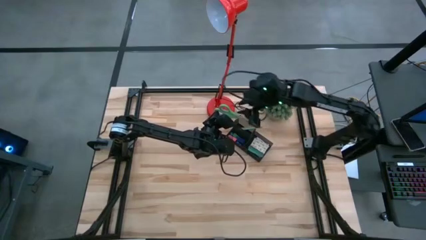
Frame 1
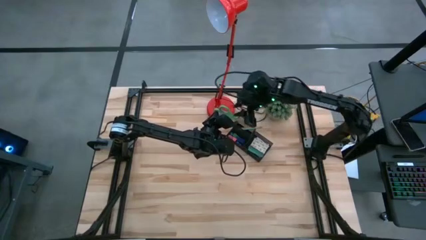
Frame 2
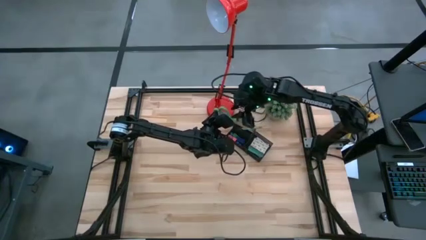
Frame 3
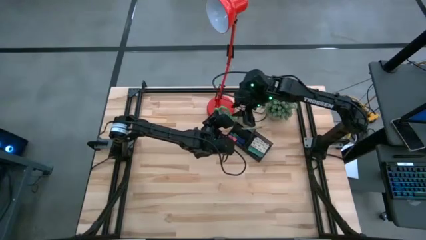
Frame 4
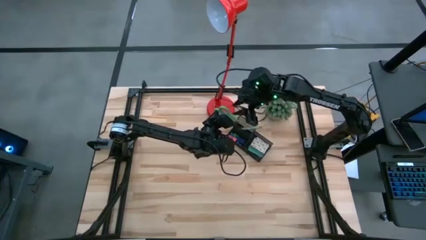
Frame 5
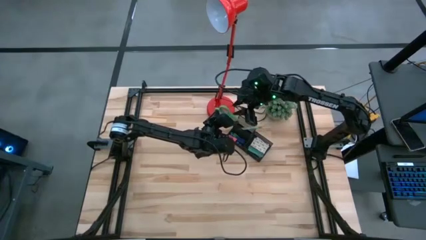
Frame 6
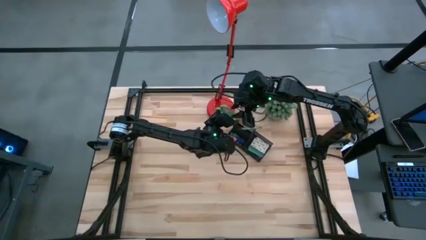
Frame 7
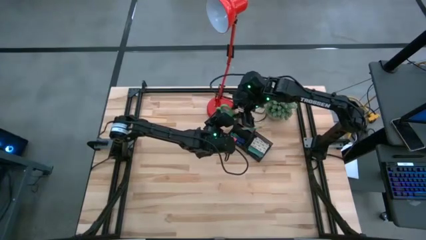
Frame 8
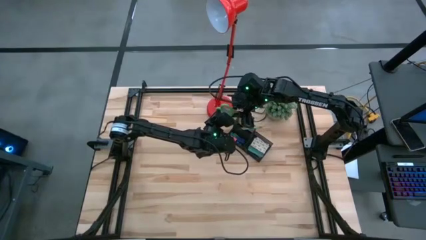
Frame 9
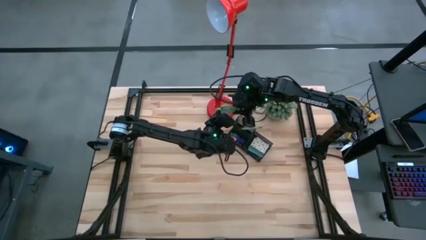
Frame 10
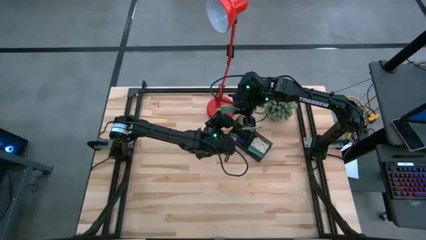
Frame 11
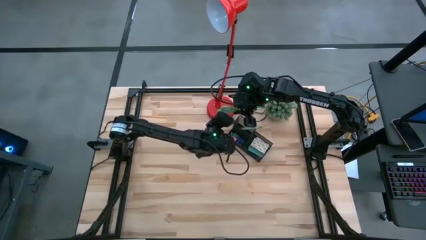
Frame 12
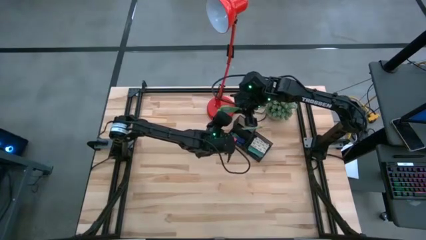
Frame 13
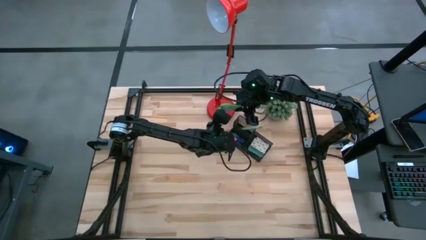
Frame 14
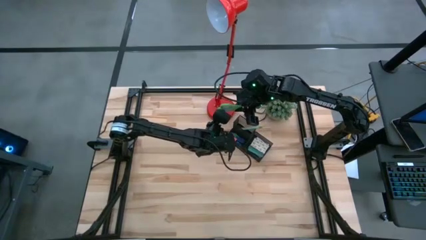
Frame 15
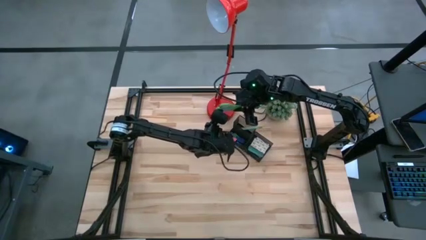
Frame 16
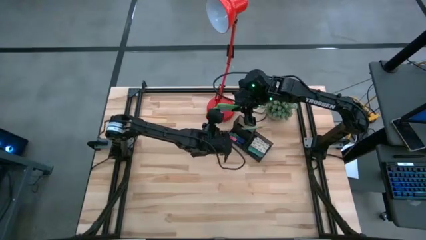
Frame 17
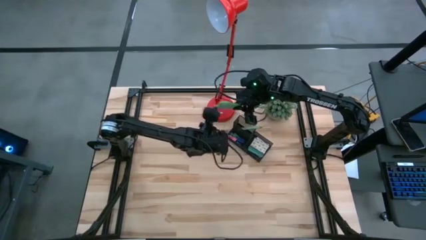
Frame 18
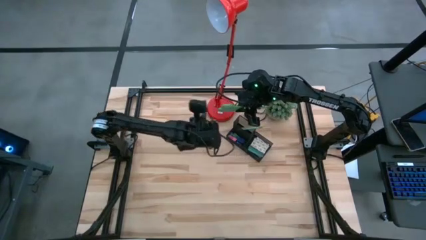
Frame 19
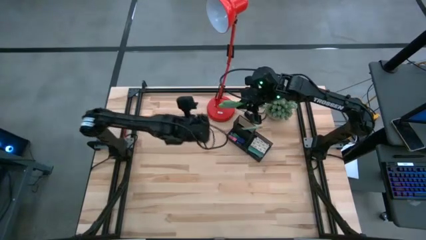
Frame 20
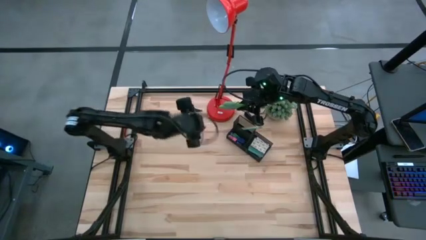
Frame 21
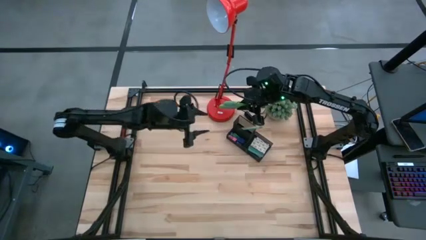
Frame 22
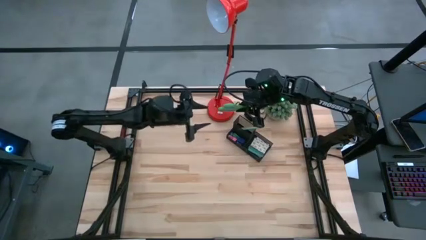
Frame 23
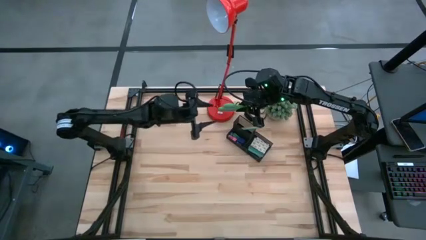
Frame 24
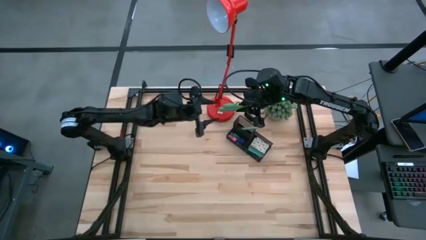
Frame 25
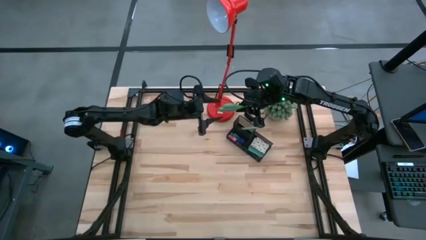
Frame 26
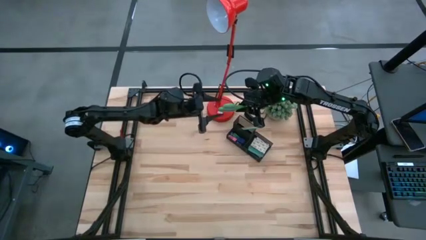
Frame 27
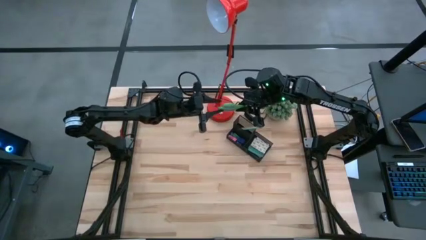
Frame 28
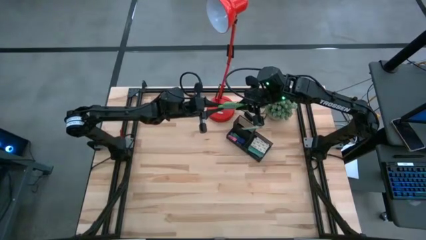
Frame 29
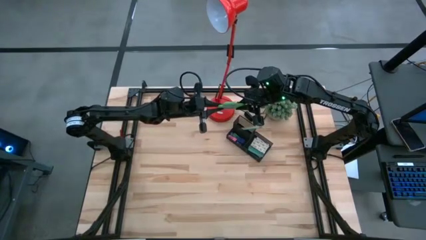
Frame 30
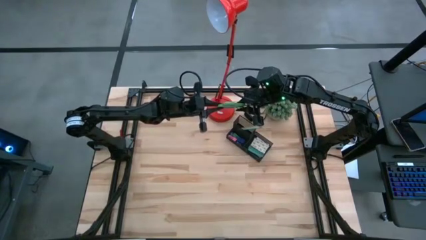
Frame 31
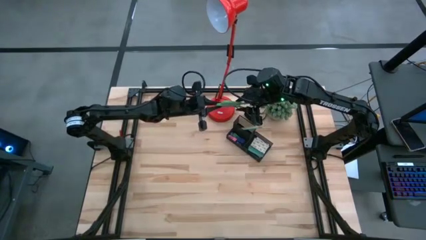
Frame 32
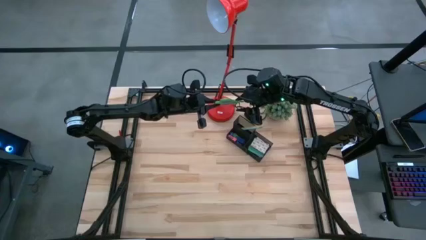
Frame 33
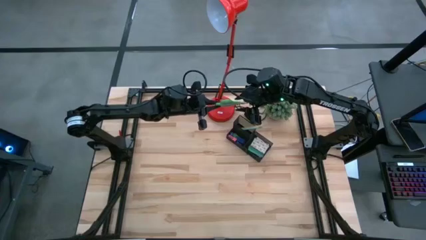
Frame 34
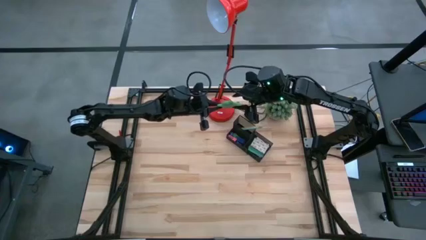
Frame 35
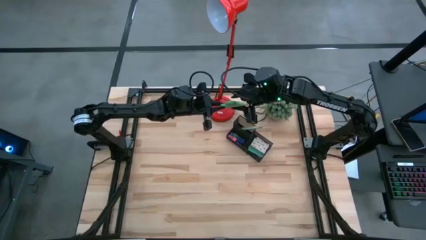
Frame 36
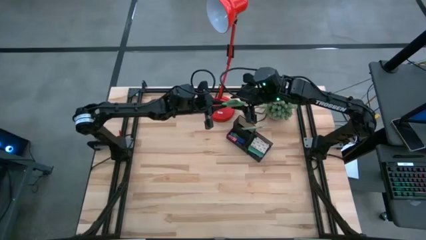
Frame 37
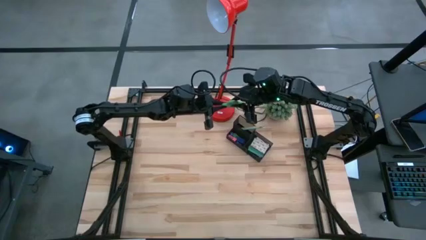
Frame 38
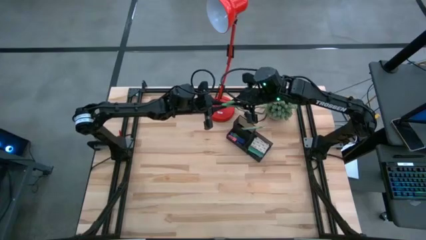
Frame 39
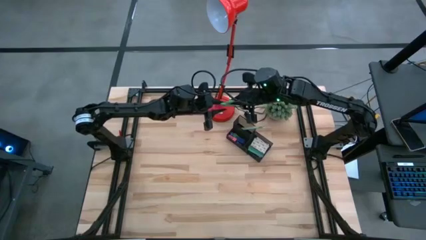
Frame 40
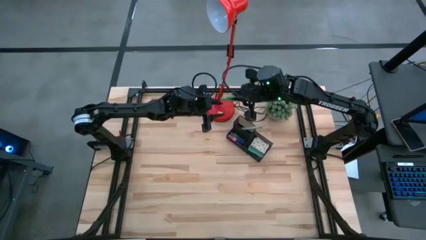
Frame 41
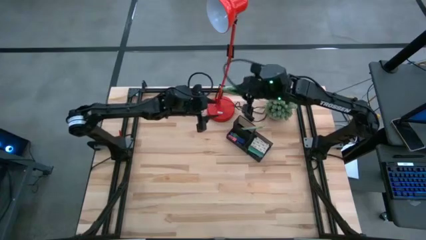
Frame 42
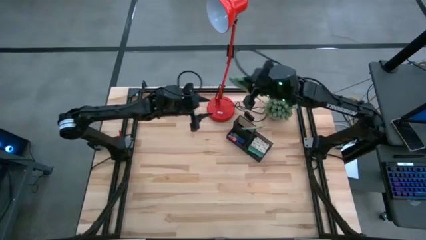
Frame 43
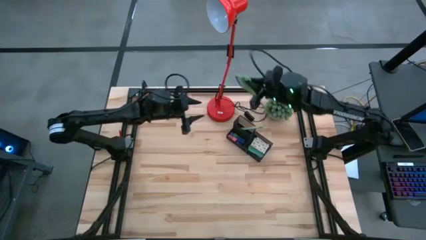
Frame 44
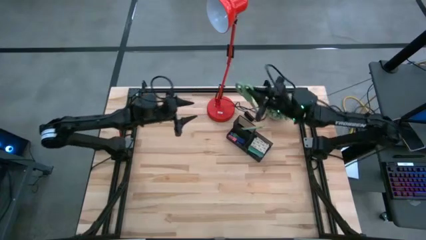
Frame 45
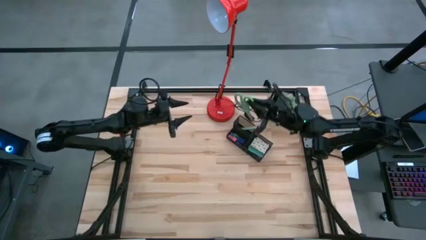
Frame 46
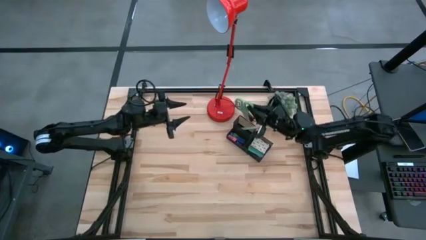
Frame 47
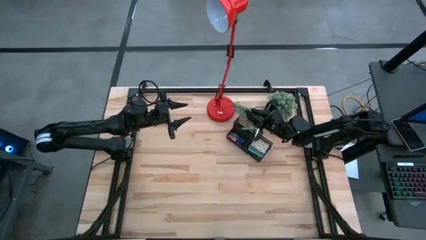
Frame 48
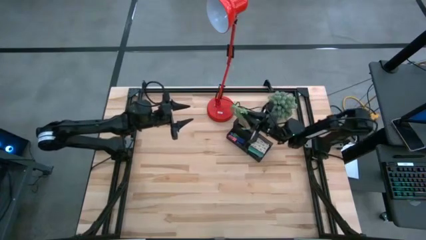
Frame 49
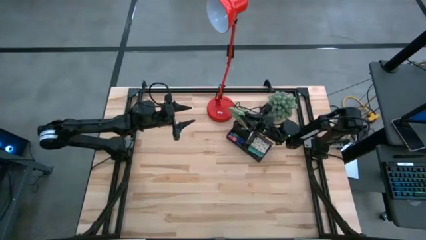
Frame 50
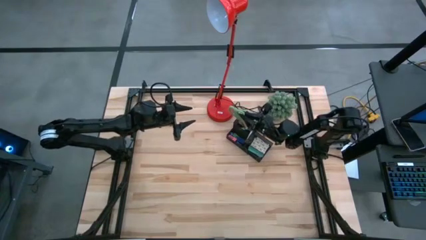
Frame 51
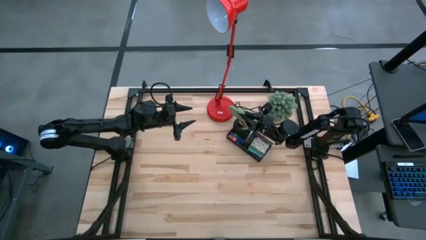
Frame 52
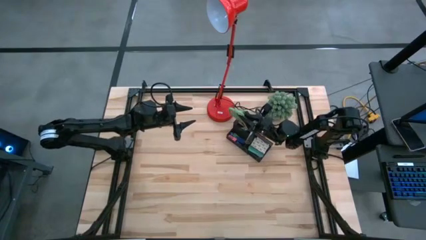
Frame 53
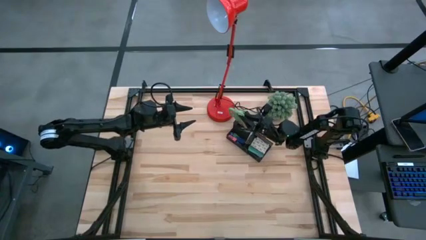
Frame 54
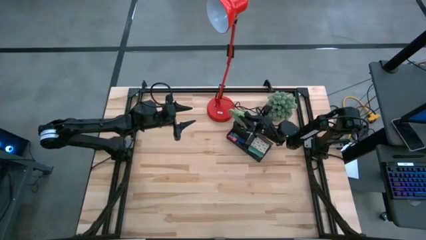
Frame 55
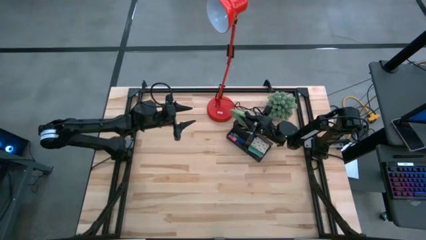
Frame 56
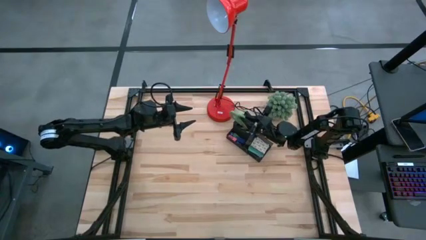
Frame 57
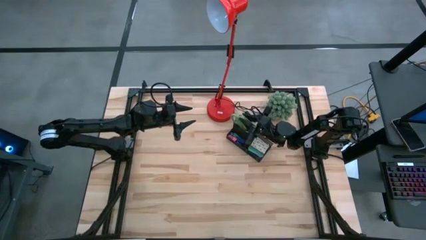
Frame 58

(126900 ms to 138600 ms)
Task: Pick and place office supplies into organizer
Put the scissors into the desk organizer

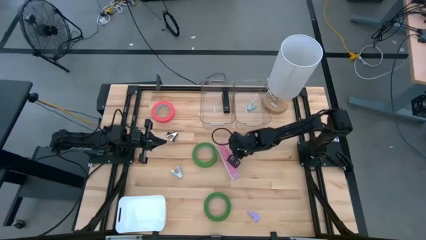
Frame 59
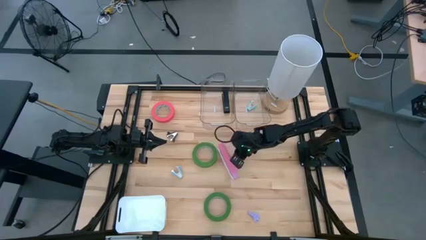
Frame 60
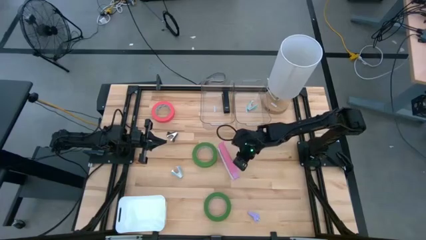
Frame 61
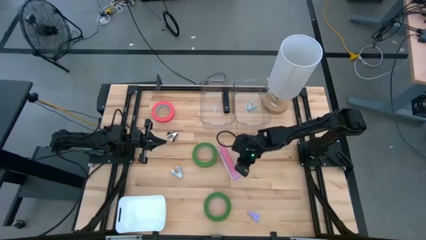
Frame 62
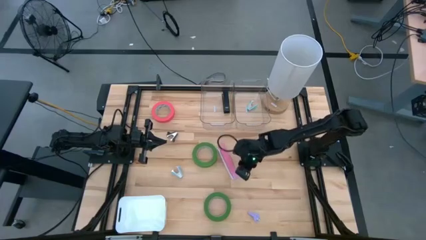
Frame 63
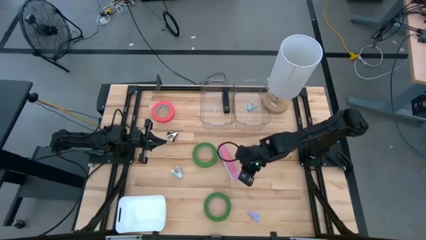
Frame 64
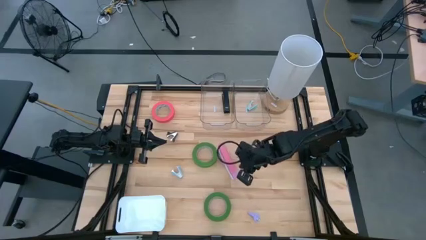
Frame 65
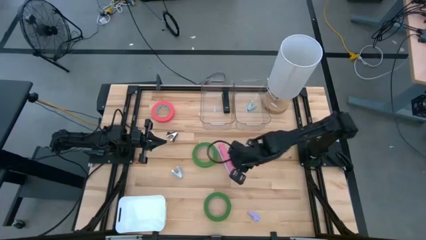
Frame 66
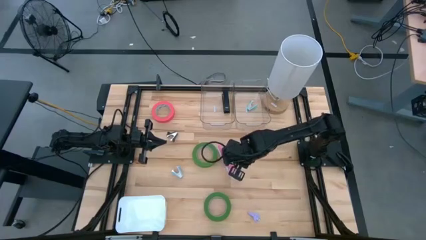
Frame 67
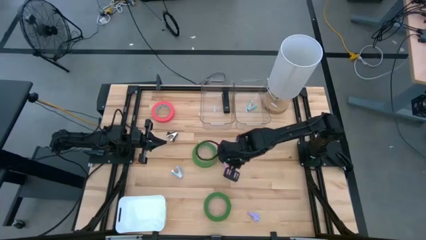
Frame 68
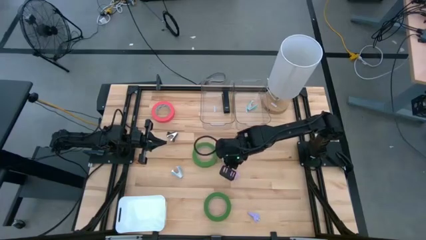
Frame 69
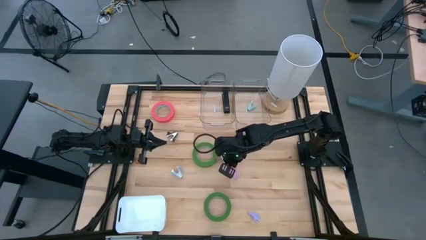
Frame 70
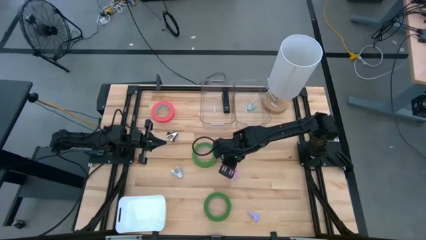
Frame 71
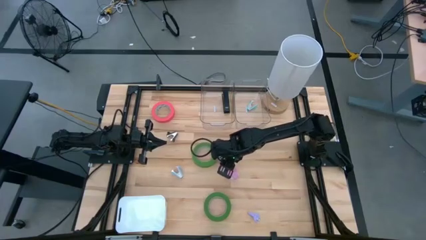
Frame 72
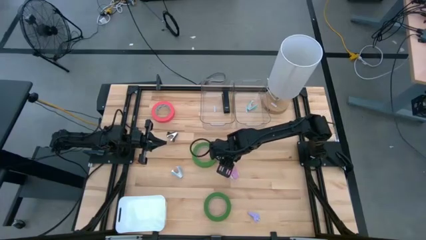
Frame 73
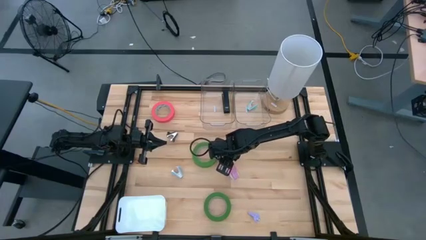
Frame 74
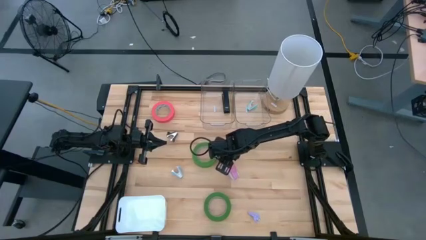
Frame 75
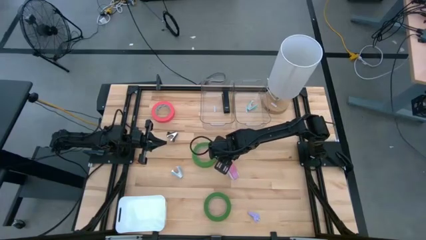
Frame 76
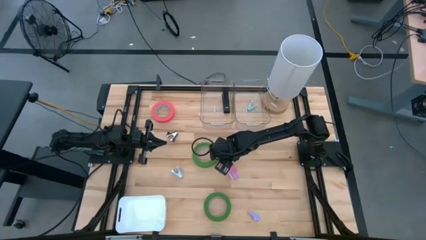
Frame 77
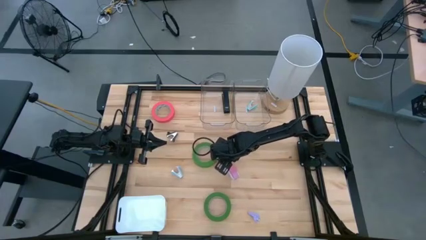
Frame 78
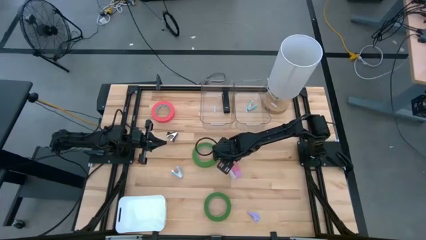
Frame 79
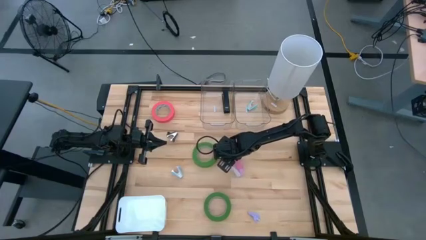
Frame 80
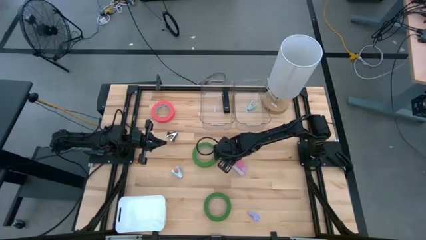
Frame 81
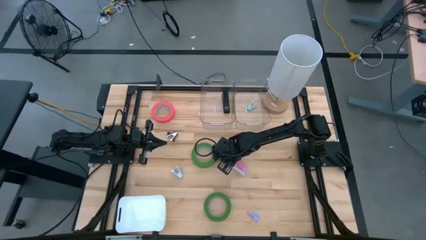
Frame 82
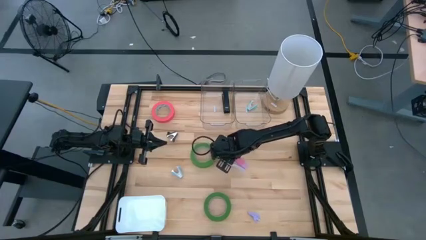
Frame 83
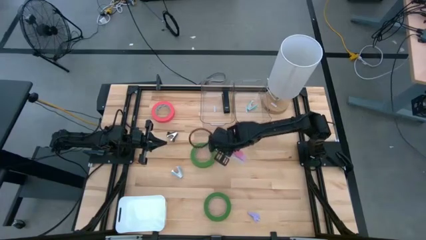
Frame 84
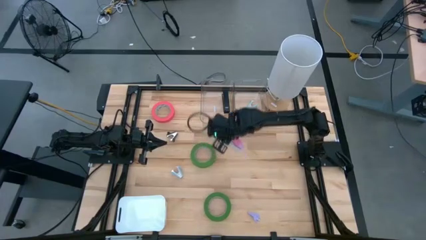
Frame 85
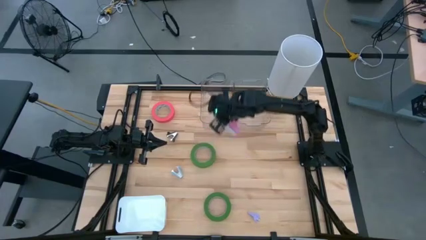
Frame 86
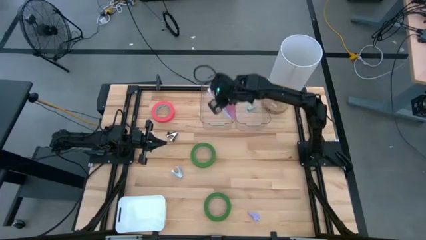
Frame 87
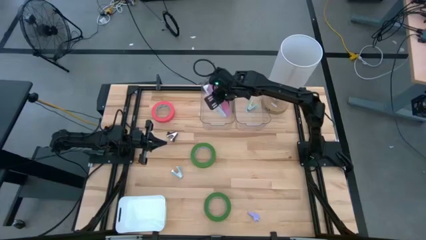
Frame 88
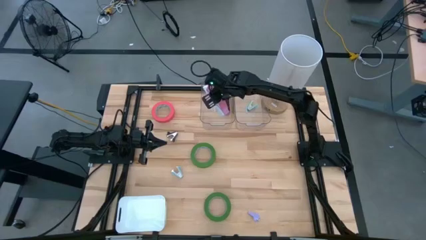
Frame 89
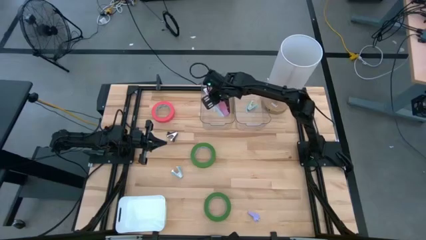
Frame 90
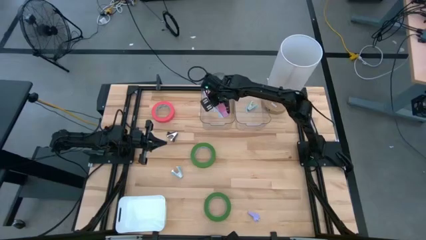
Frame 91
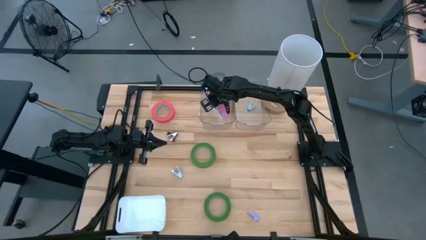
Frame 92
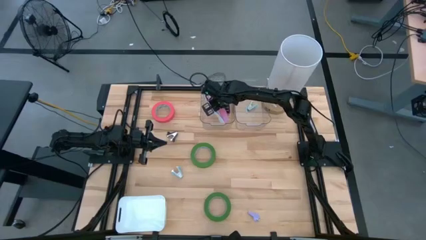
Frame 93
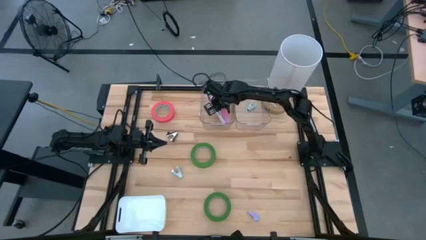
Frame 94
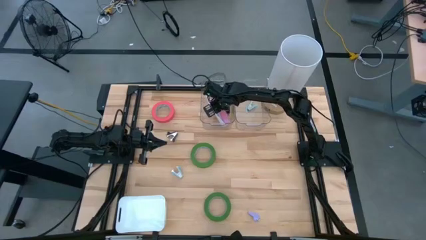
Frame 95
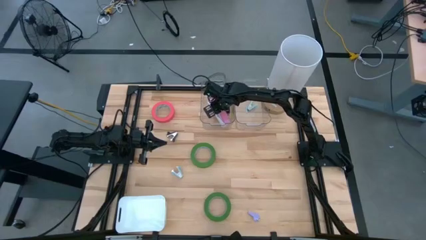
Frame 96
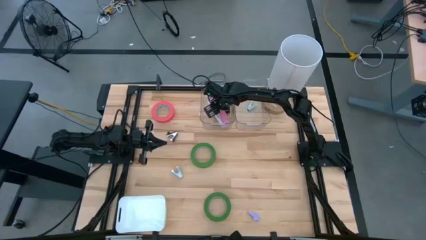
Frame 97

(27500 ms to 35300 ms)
Task: Pick and place Stapler, Stapler remover, tape
Put the pink stapler into the left transparent bin
